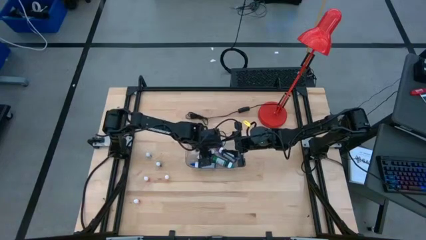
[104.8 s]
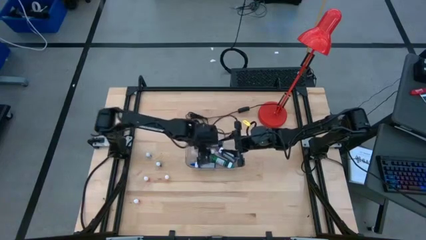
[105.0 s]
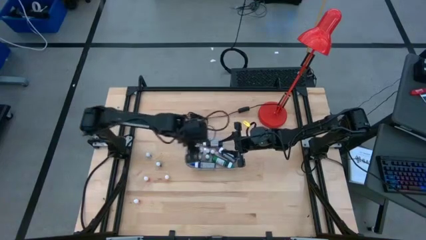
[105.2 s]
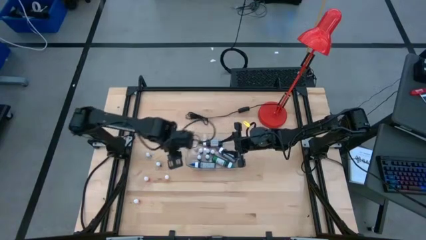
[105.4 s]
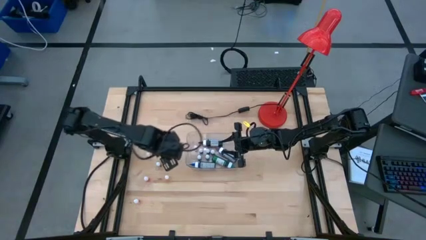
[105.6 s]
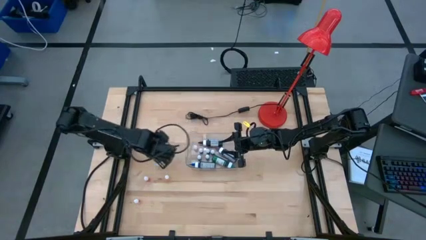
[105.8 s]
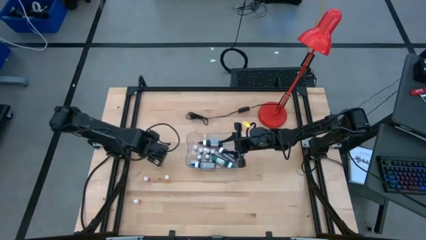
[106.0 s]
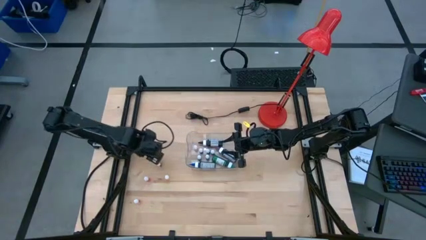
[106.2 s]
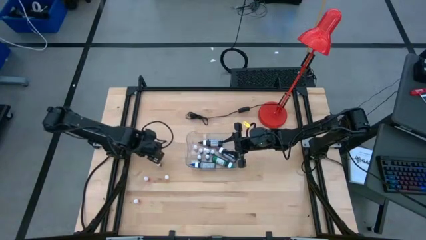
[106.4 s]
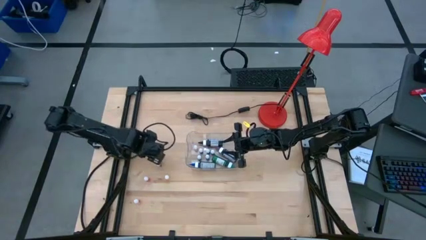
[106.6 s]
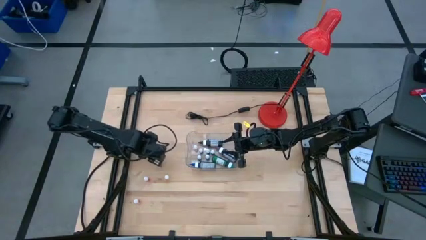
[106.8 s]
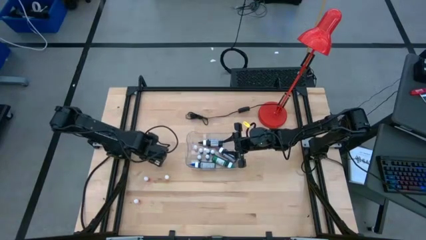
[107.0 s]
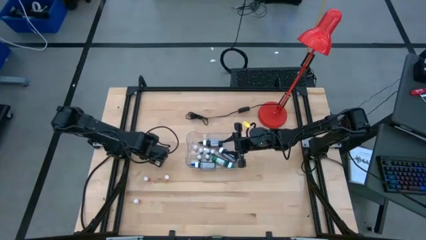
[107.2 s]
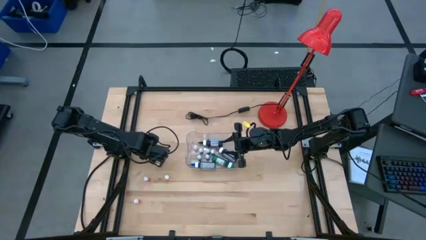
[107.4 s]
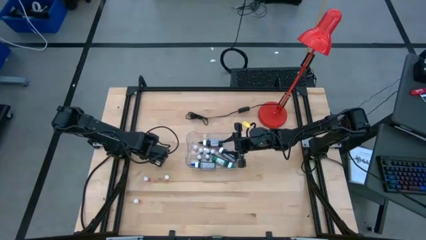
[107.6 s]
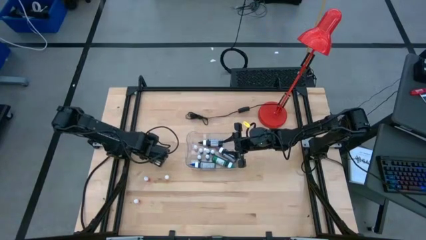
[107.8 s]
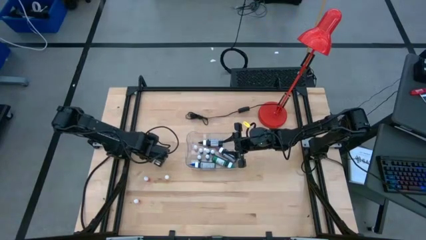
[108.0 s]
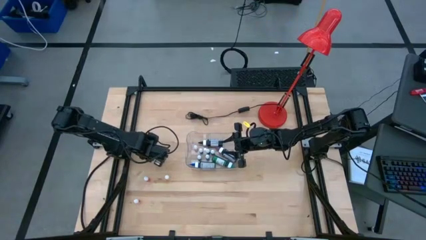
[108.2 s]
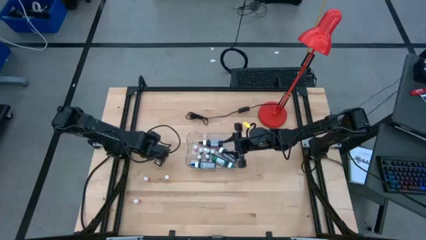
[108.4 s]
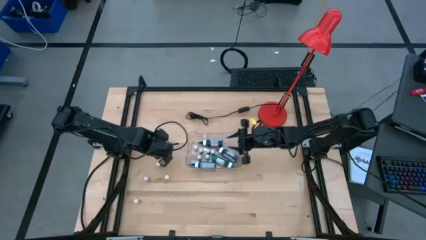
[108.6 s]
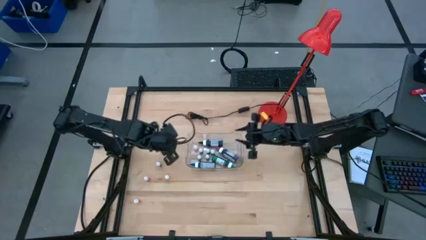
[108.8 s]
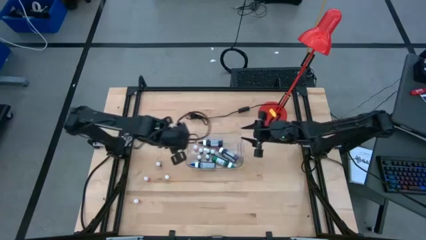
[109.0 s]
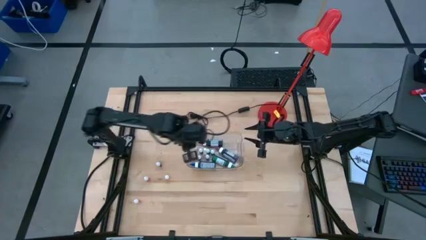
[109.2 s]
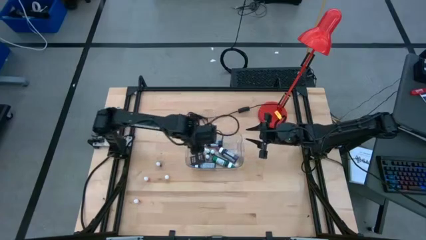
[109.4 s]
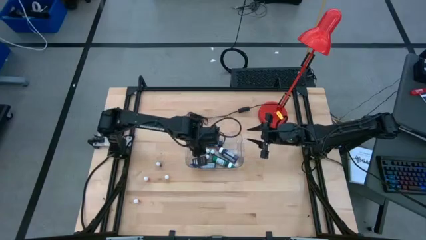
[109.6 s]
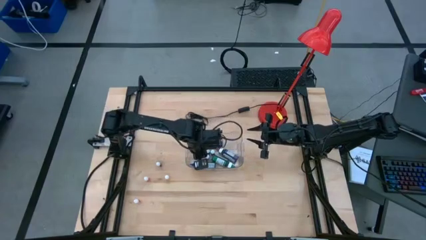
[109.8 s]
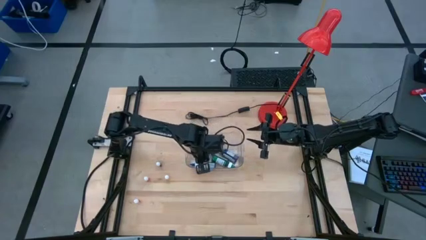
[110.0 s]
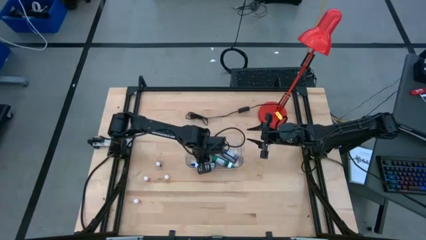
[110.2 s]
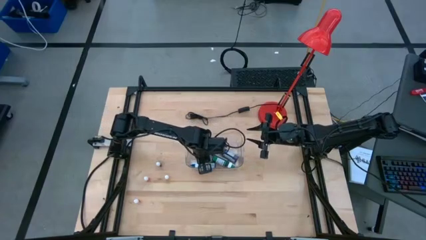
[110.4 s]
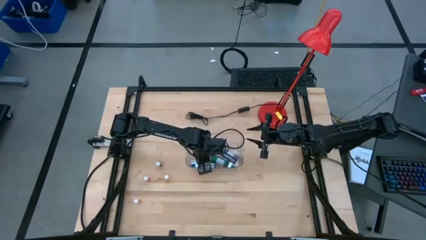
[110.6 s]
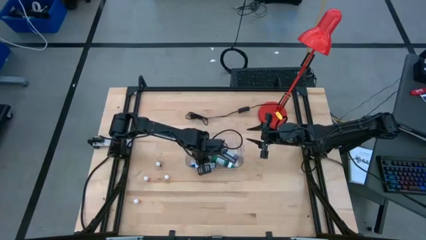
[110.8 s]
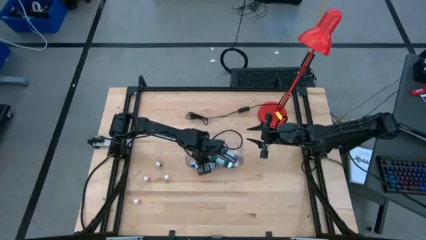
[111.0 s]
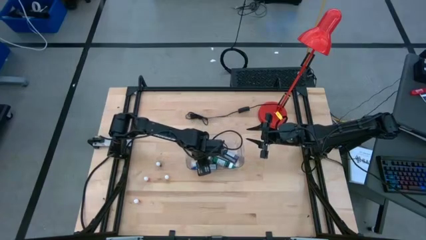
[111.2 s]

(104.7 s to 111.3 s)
Task: Pick & Place food coloring
Put the small blue food coloring bottle into the transparent bin

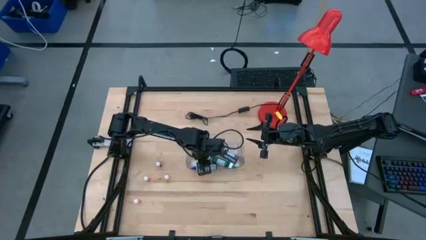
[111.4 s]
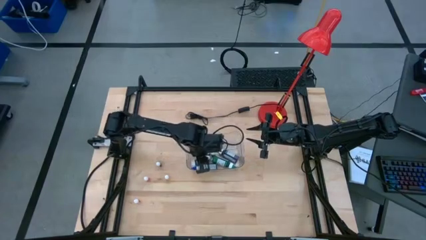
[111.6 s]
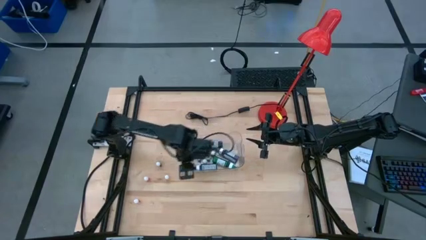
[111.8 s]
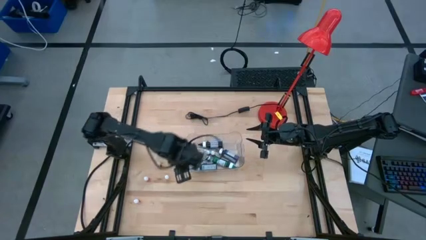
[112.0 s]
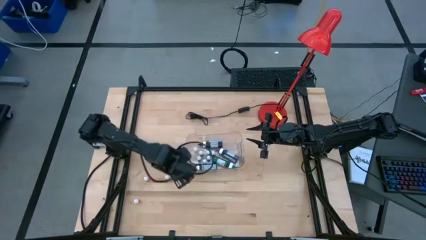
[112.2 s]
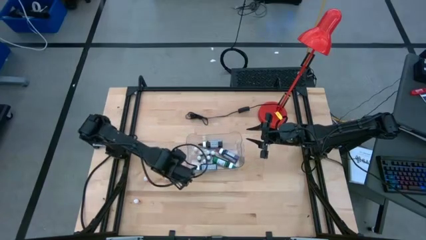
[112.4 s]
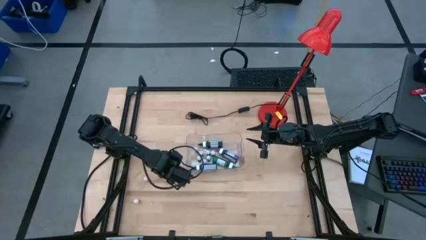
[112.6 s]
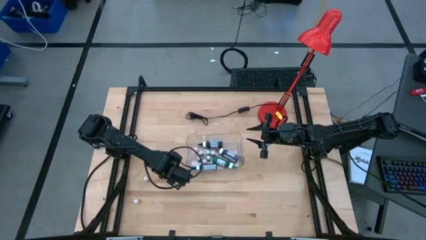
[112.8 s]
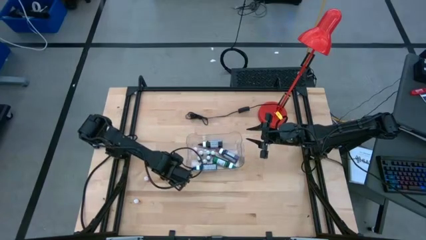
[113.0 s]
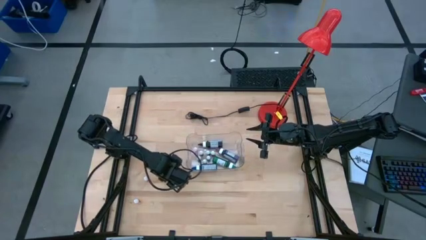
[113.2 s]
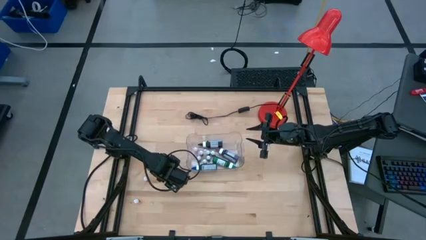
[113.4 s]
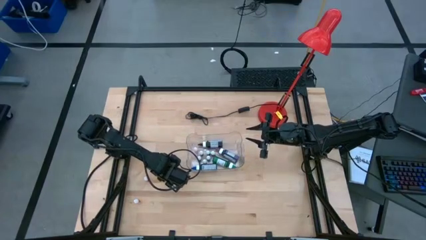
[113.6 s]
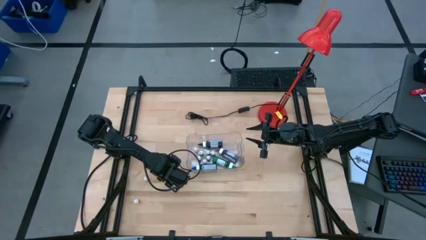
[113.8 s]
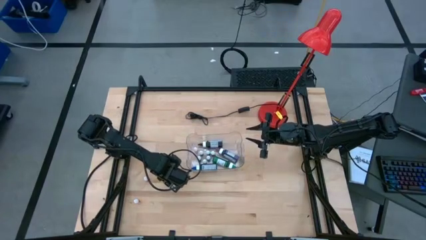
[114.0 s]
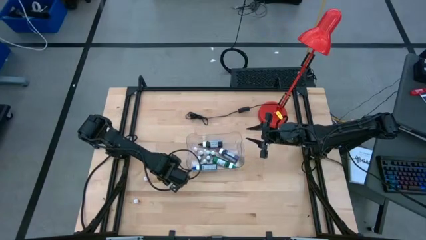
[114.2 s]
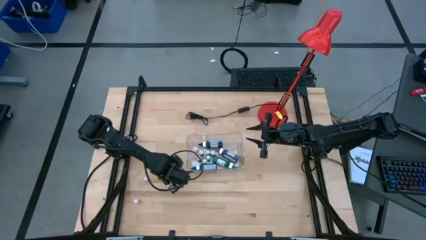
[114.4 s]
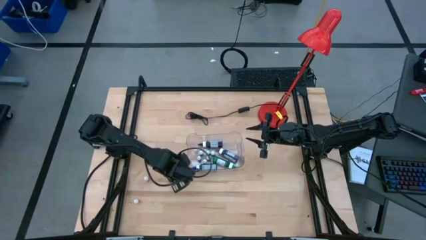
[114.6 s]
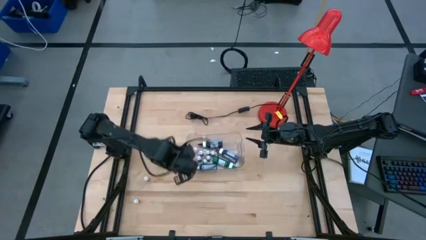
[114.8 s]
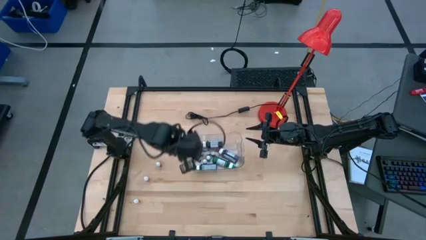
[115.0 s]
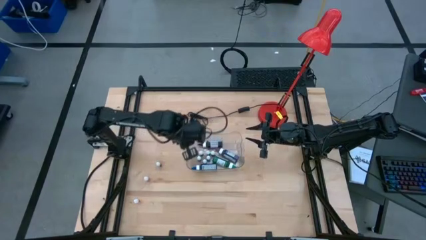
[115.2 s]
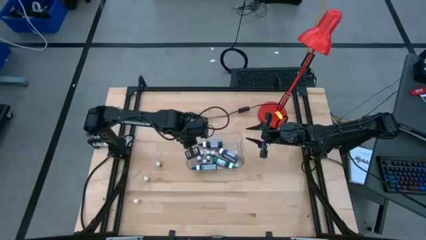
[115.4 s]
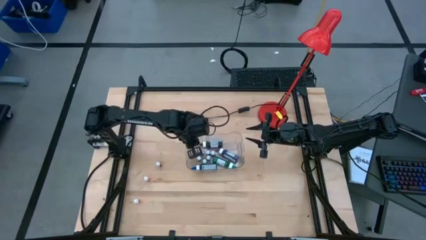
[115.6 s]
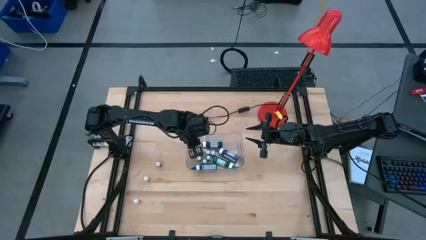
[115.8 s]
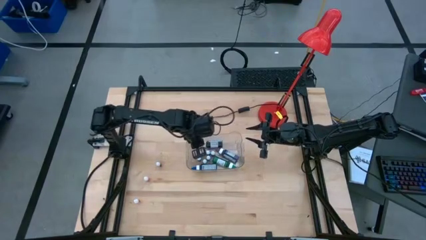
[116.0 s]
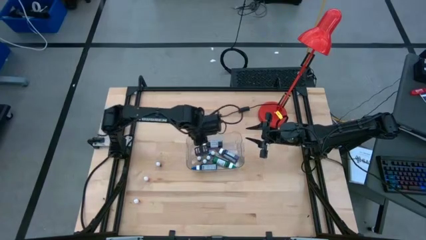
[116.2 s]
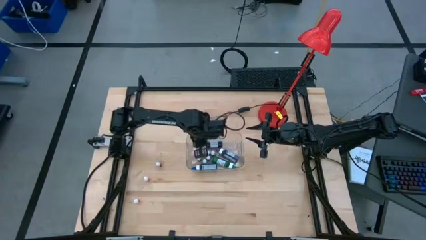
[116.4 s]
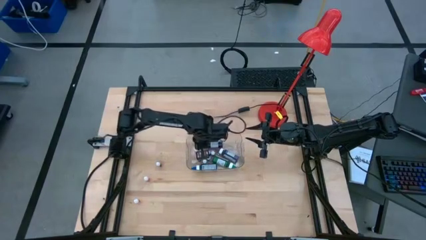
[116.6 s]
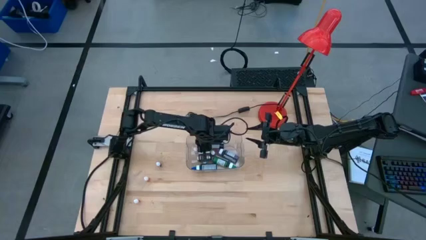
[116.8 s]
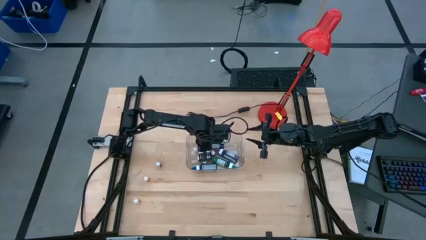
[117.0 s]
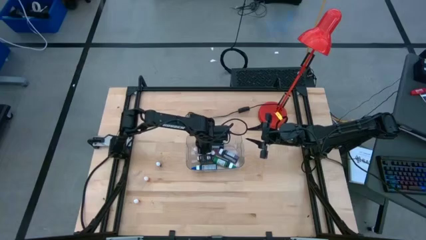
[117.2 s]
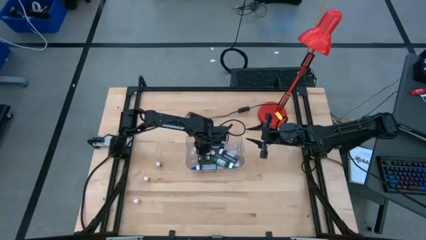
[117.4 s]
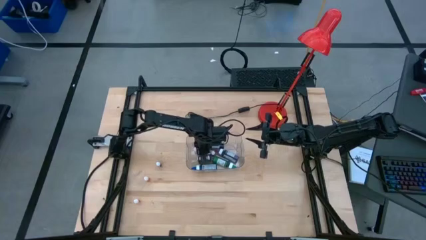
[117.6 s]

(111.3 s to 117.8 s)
Put the small green food coloring bottle into the transparent bin

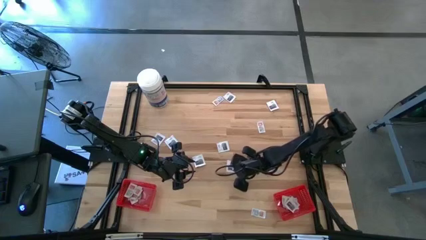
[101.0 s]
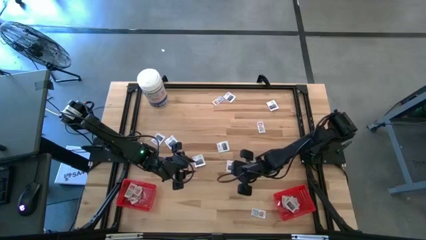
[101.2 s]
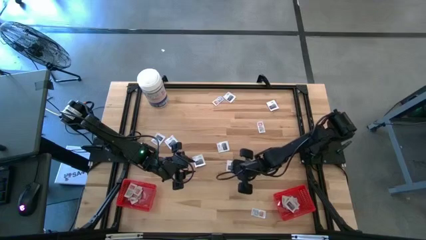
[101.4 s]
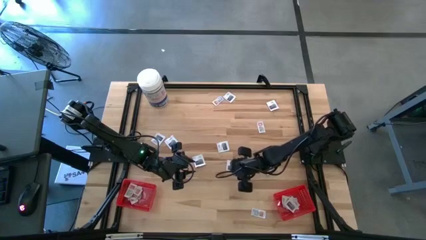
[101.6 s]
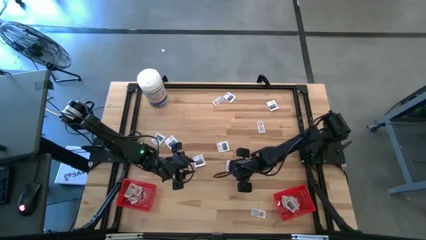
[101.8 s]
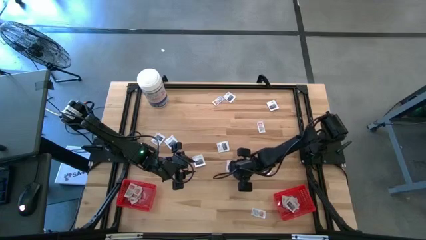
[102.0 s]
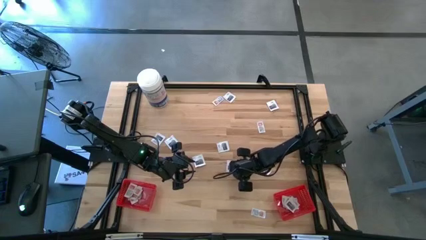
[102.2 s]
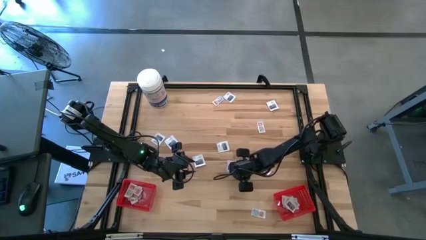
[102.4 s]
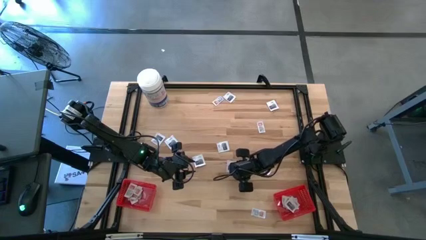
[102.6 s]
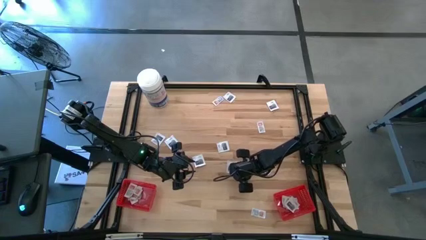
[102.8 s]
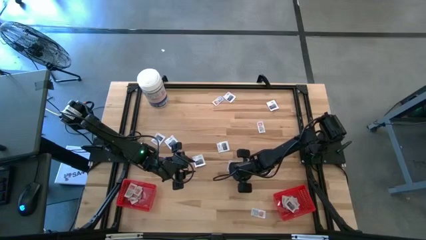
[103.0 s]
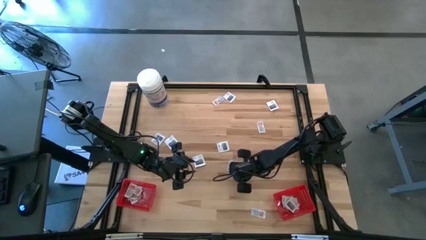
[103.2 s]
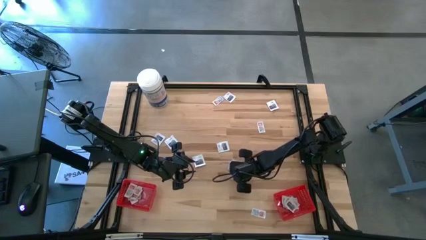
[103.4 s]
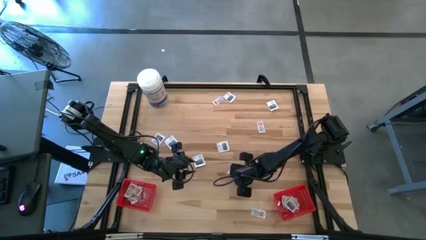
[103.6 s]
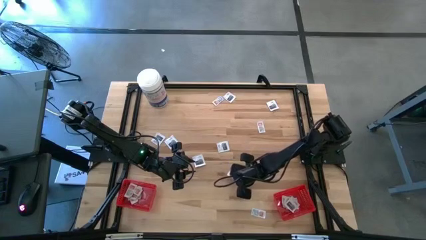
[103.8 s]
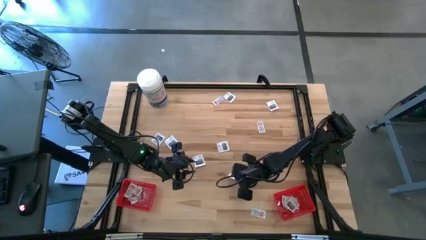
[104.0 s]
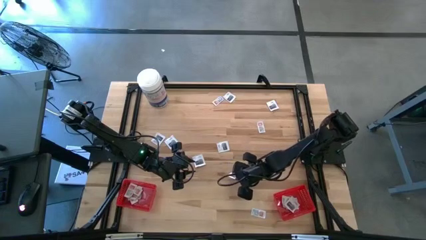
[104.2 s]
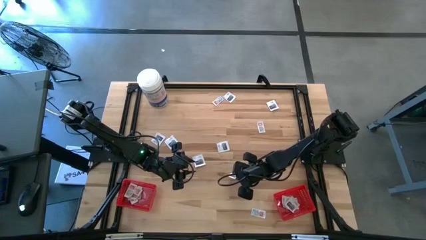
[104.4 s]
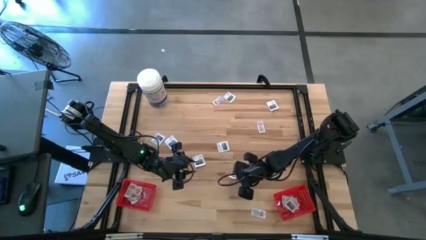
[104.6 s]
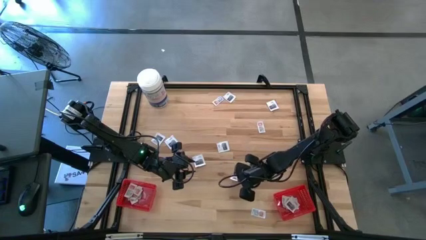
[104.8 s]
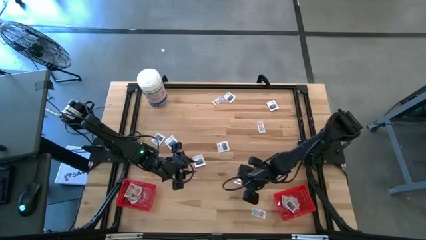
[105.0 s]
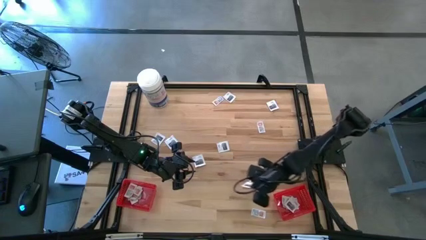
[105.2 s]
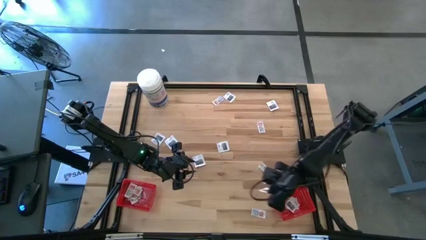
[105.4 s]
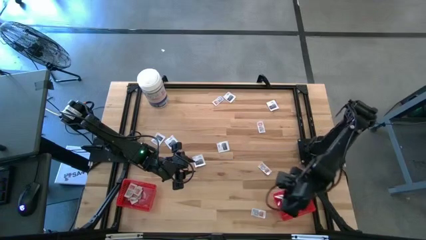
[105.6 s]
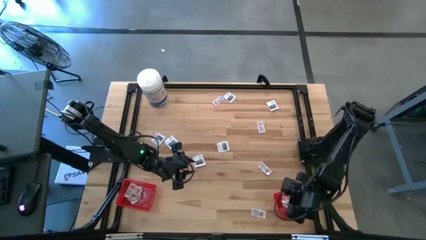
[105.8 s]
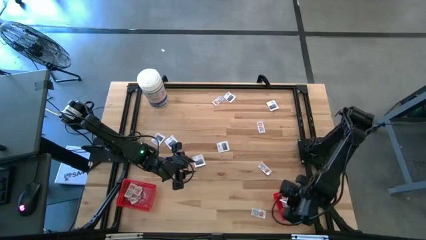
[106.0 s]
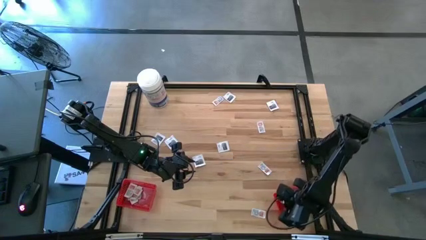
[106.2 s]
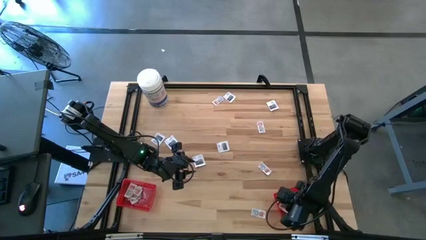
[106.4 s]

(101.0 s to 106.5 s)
Task: Pick & Place First Aid Supplies
Put the towelette pack into the right red bin
